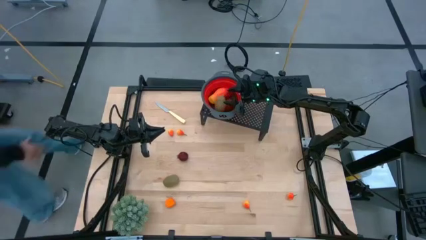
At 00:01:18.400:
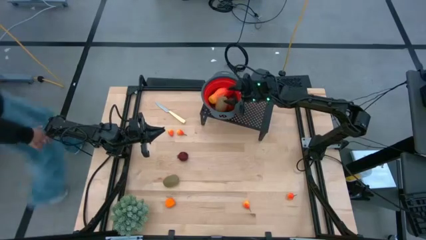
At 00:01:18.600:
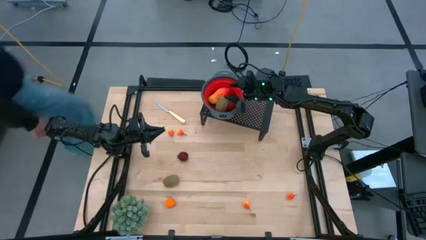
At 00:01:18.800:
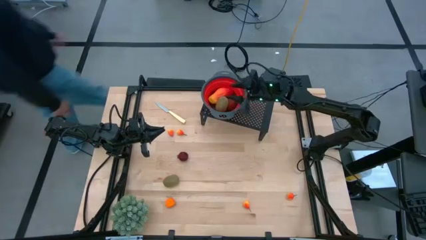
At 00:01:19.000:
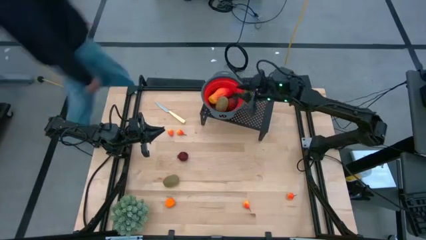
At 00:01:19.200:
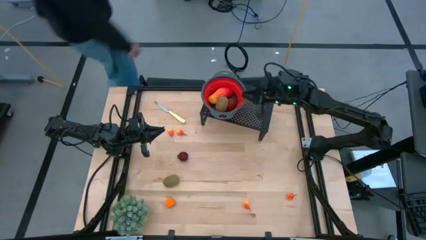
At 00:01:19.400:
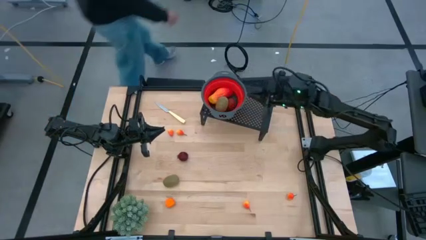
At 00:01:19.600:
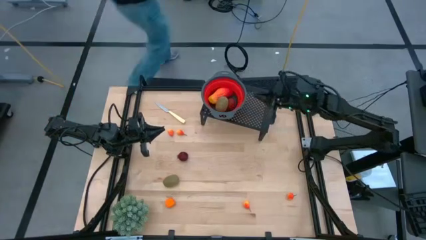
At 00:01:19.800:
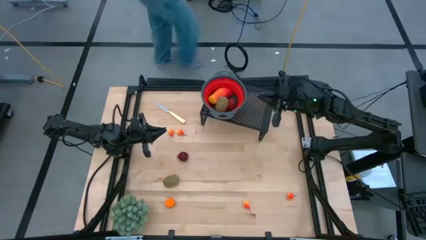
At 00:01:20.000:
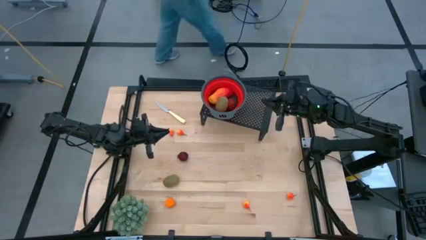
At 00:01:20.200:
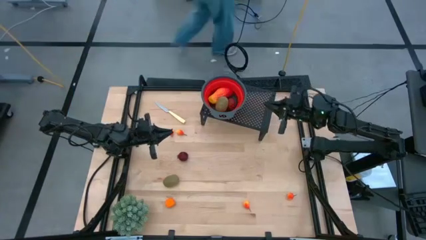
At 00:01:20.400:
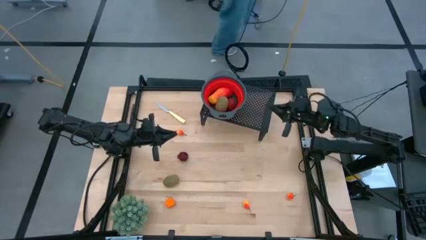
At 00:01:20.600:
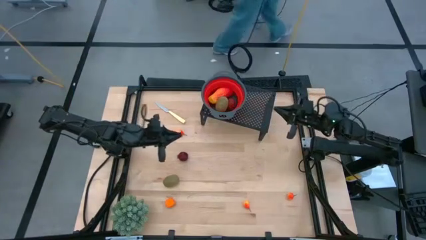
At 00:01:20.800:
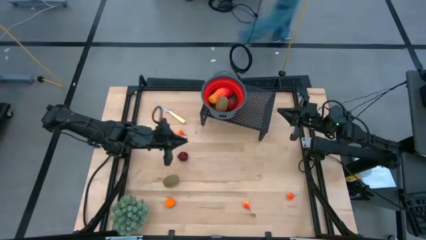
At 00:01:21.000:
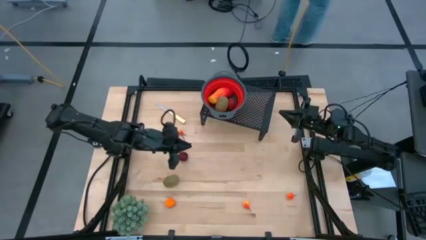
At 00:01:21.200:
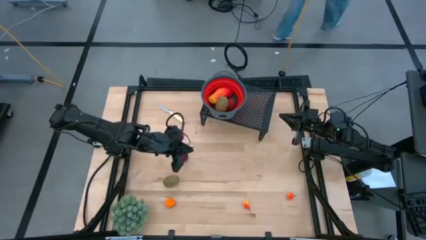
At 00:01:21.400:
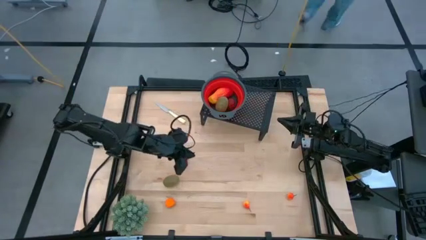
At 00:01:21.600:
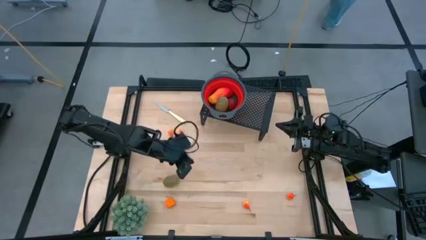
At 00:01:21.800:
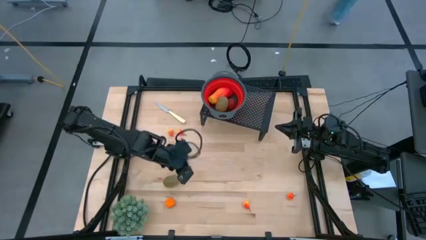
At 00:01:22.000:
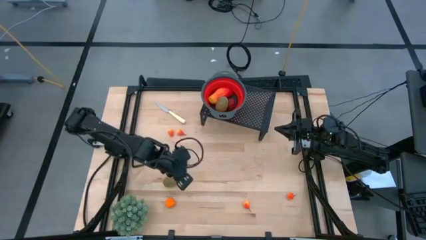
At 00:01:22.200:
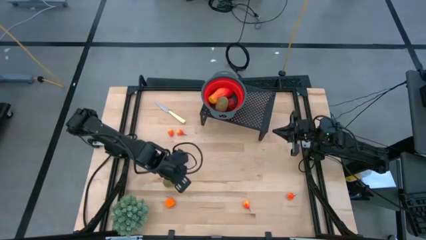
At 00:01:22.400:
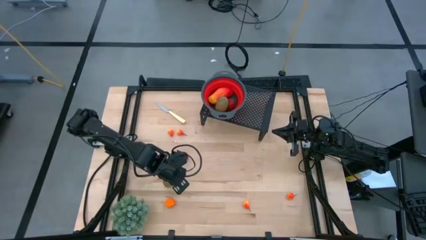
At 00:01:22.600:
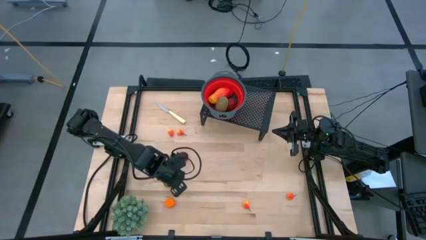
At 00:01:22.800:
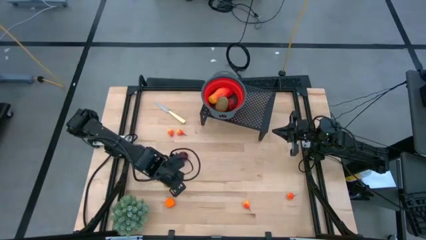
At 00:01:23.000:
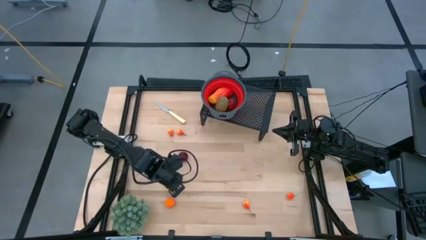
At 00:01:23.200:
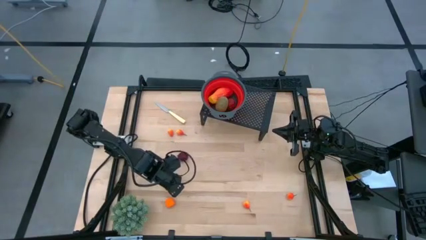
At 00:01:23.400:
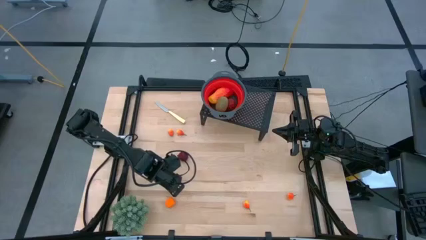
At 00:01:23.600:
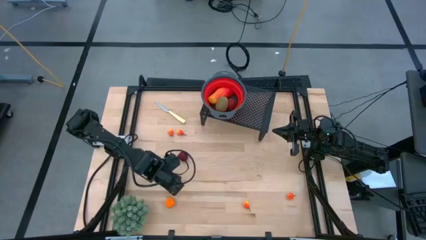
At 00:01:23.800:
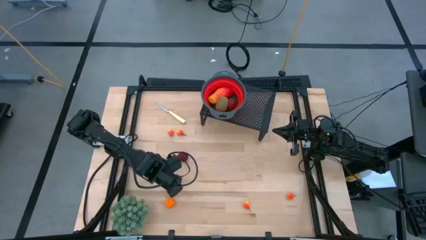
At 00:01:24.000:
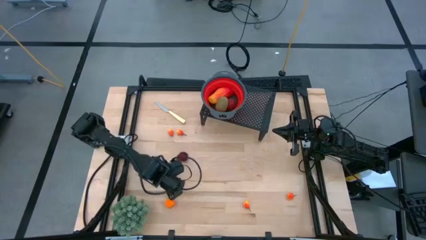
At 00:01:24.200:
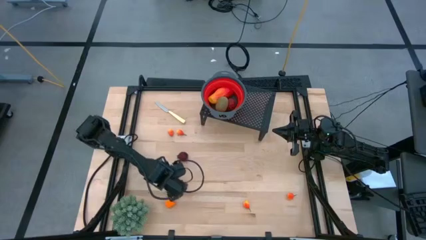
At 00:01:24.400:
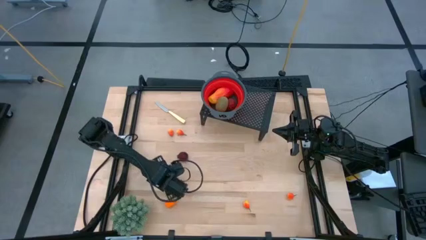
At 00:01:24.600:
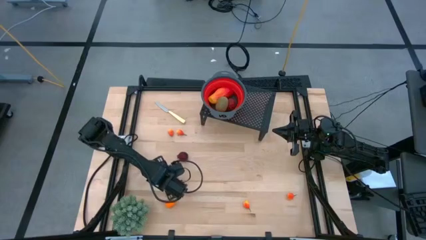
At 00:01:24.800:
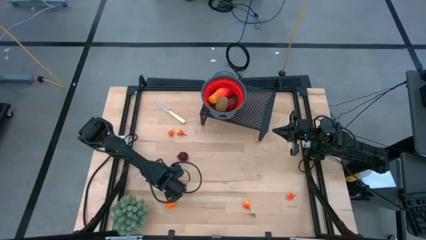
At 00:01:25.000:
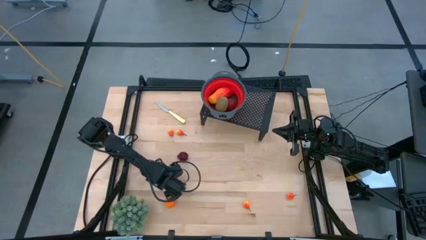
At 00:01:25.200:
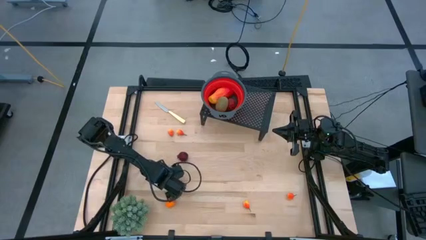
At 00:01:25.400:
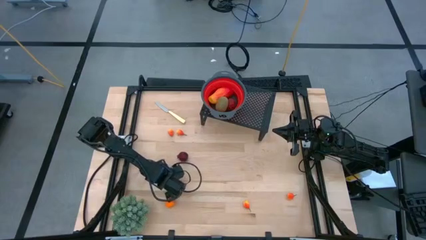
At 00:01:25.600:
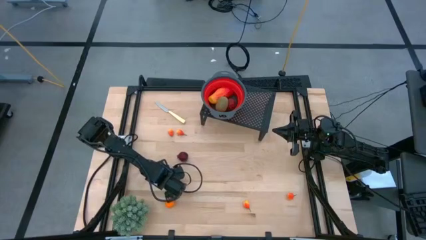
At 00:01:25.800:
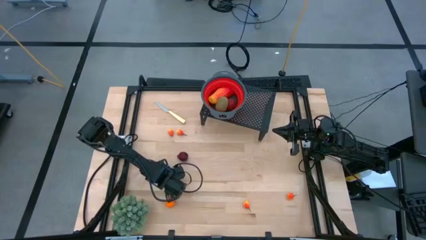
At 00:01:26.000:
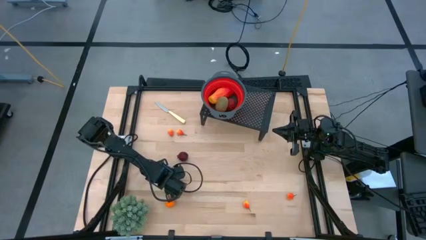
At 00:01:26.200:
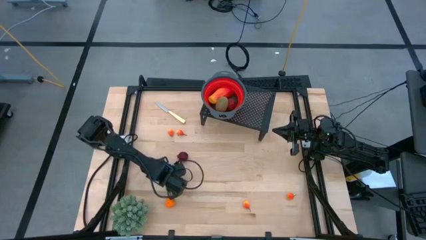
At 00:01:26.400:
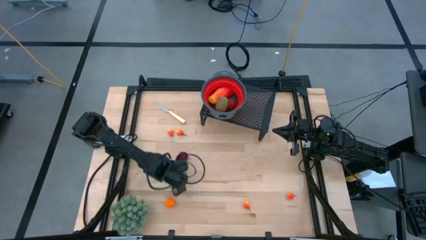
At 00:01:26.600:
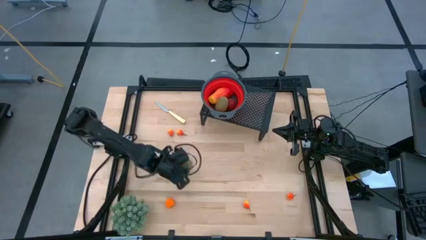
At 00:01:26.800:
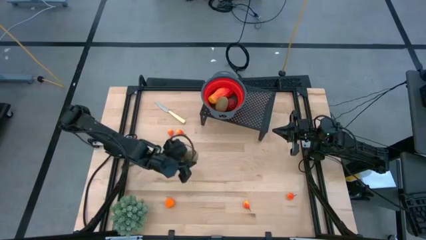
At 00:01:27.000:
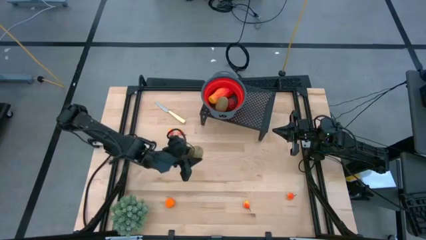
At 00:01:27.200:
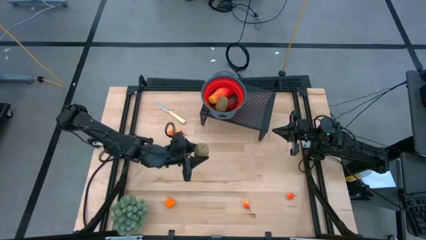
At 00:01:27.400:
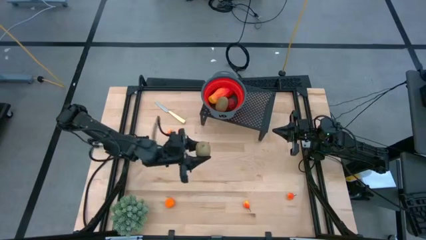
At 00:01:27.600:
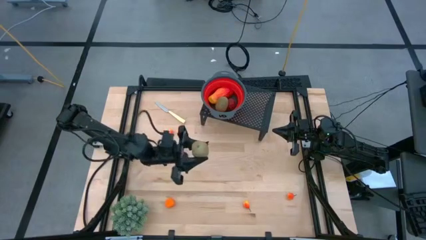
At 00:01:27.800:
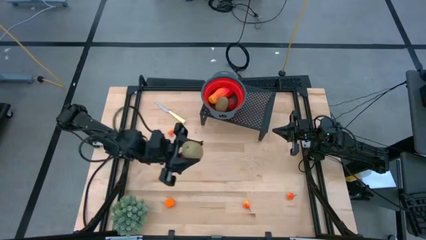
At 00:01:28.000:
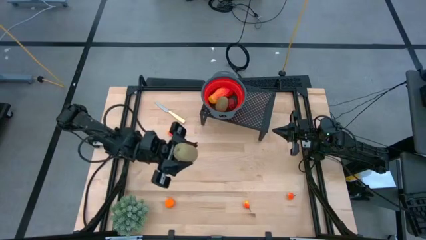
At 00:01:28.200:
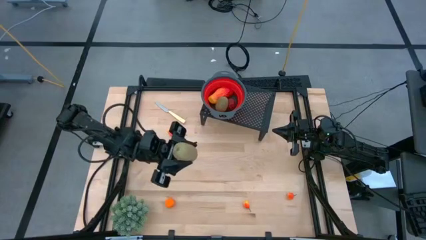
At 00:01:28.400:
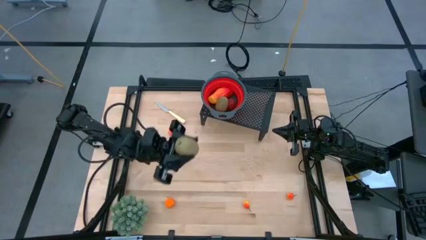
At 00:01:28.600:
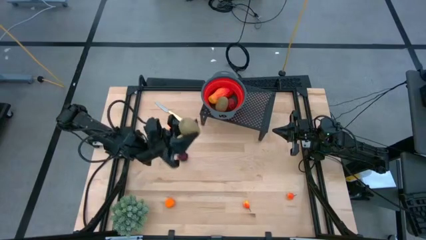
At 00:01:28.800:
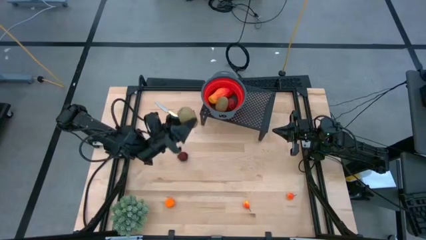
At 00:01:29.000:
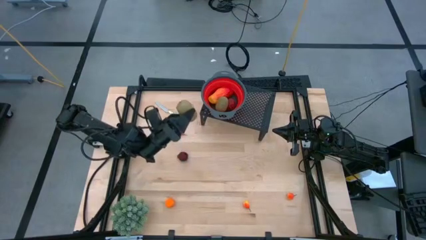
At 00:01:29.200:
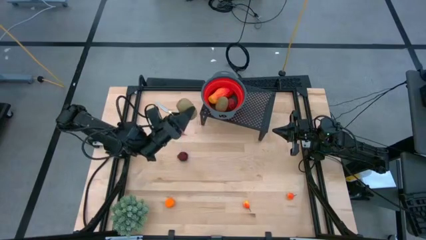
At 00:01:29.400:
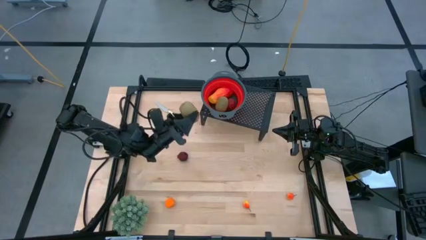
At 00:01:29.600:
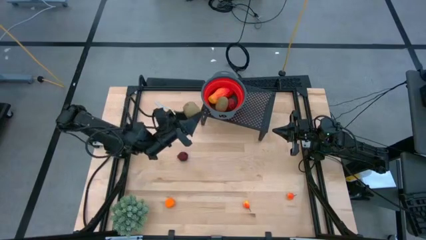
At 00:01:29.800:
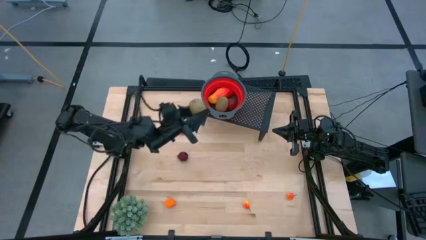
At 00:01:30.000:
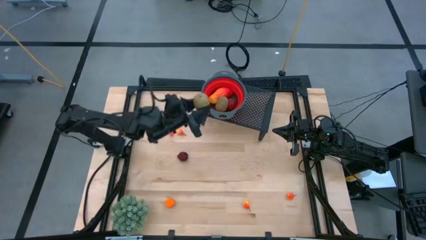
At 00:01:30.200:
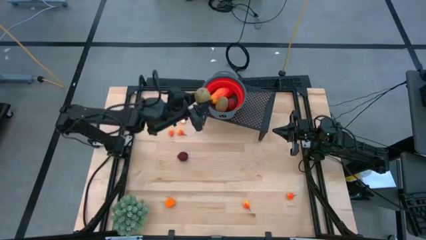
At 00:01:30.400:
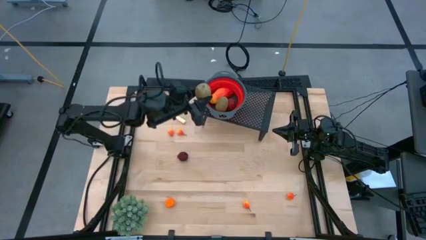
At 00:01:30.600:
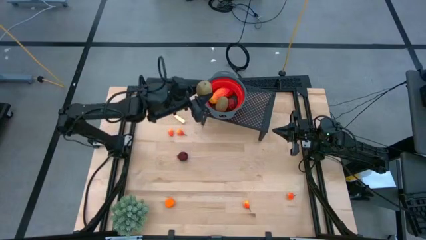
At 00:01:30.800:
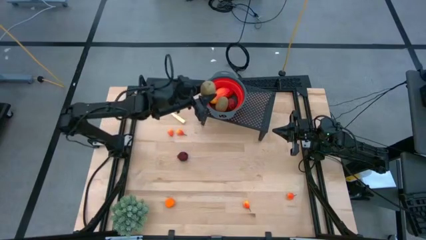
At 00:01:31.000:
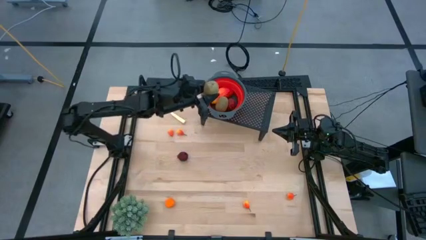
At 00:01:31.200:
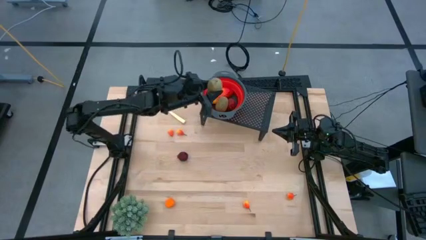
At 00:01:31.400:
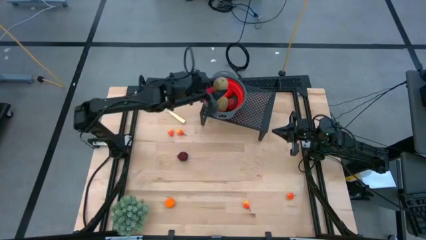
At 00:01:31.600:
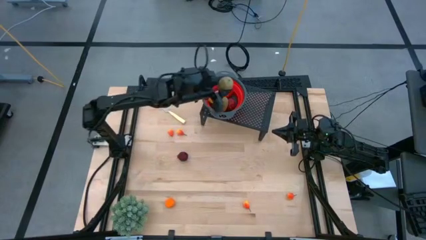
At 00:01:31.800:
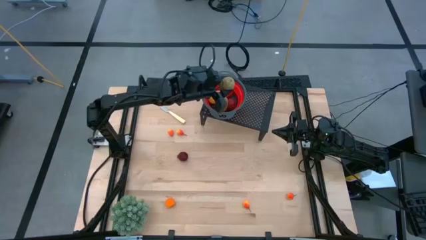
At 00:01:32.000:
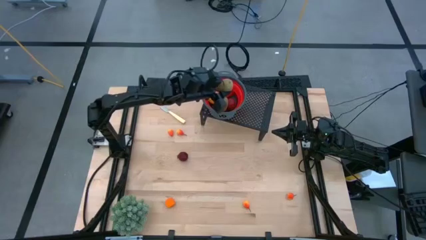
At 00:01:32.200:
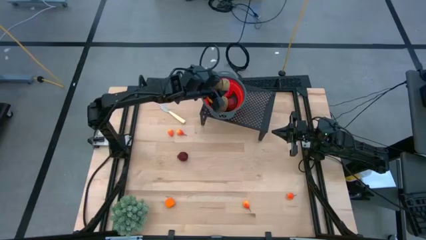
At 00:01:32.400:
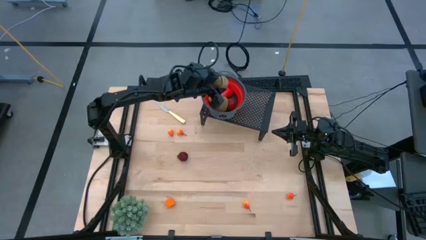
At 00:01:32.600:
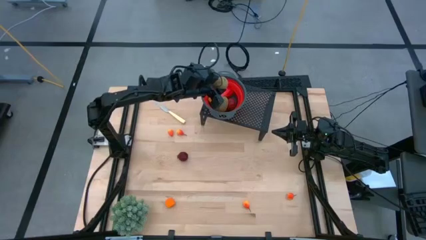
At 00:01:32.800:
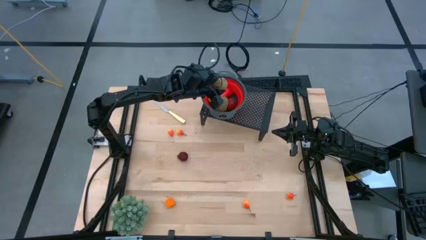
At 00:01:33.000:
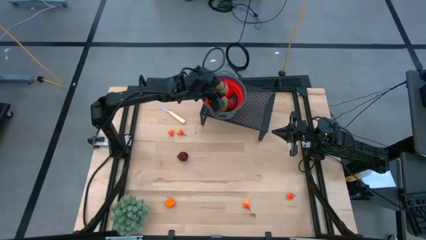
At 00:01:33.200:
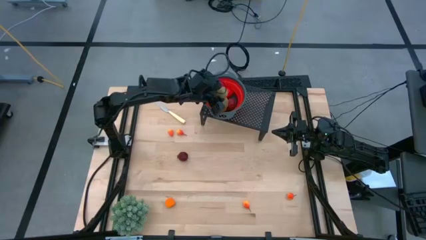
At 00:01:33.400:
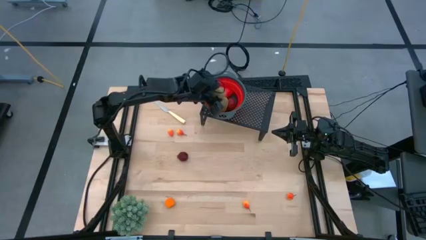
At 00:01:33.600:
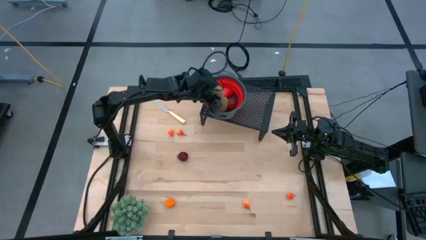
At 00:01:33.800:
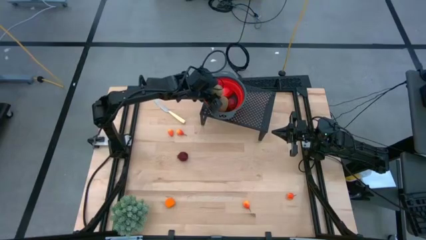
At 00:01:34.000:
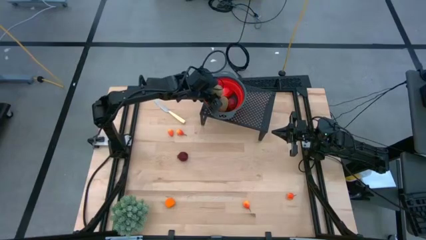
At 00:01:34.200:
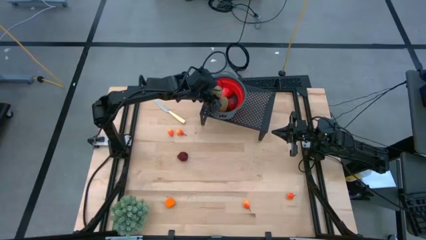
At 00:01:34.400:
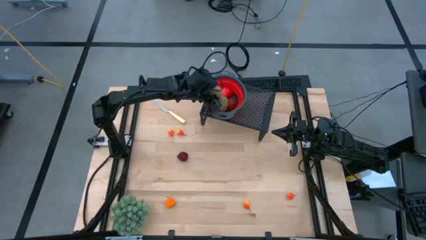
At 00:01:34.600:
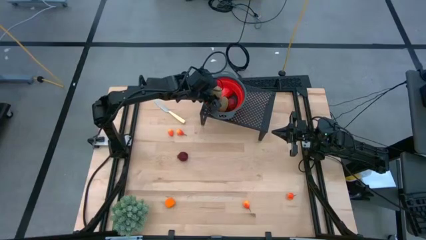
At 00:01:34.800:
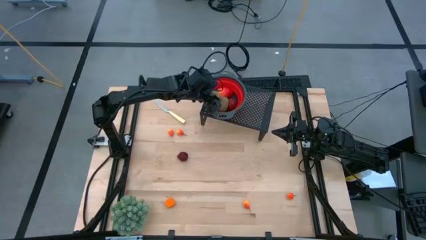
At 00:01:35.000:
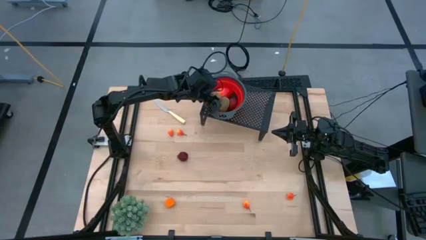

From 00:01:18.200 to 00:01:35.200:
Task: Pick & Place Fruit
Put the kiwi into the strainer bowl on the shelf
